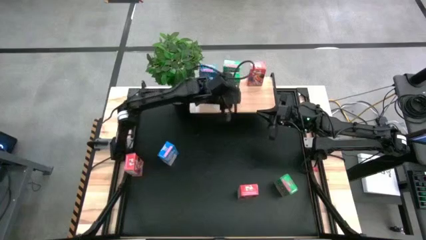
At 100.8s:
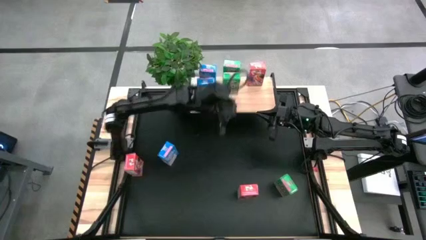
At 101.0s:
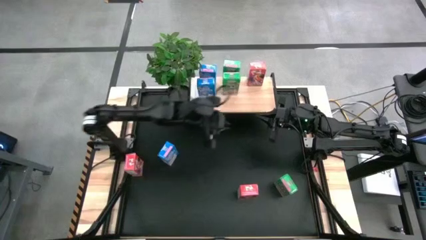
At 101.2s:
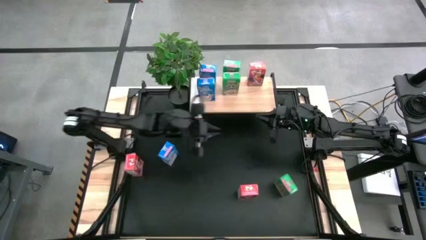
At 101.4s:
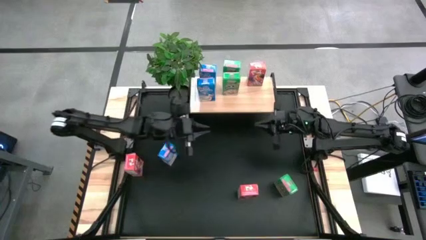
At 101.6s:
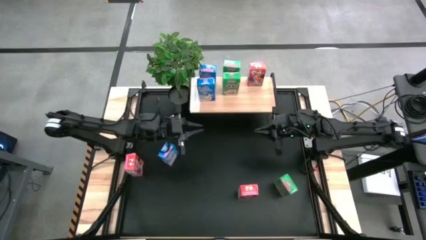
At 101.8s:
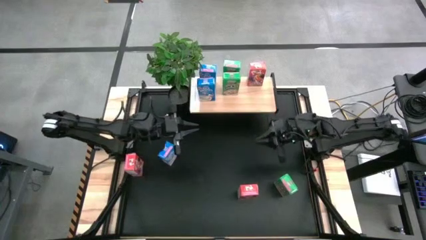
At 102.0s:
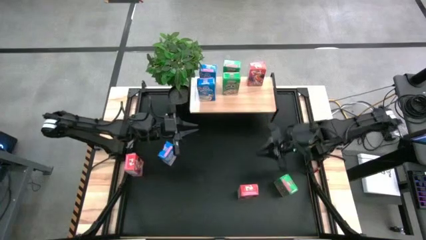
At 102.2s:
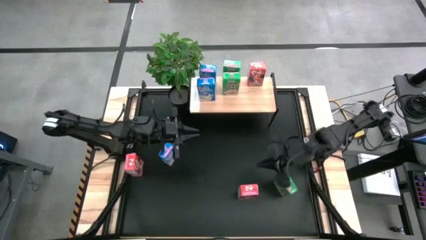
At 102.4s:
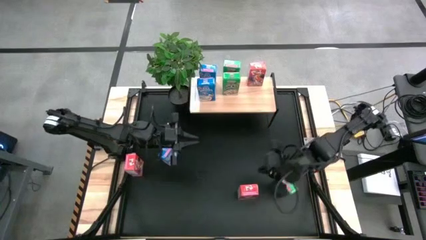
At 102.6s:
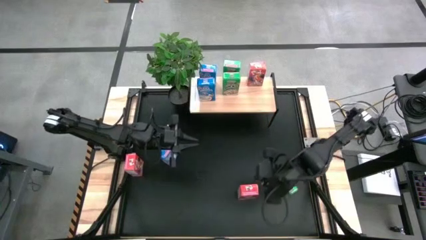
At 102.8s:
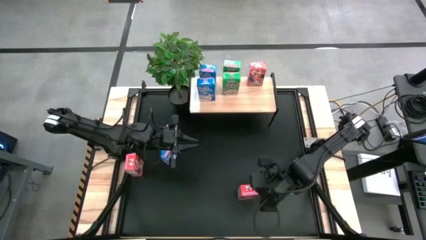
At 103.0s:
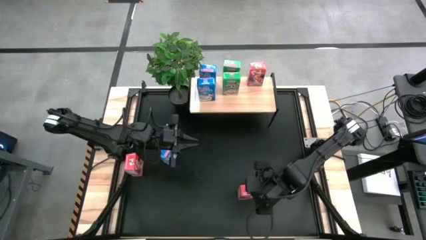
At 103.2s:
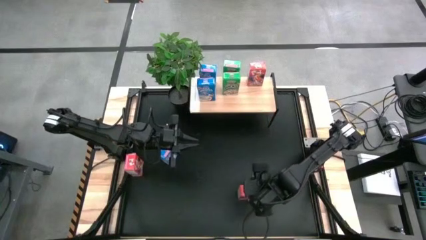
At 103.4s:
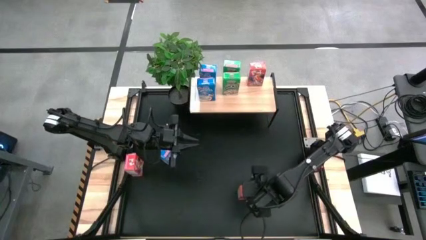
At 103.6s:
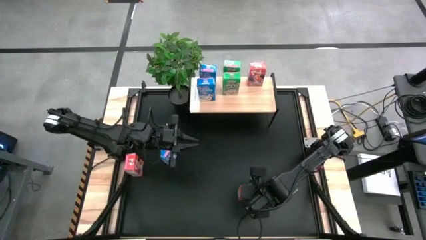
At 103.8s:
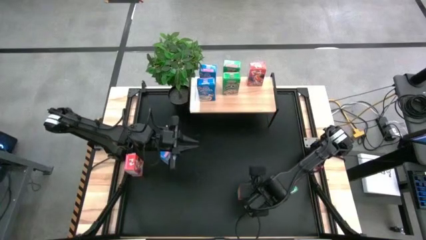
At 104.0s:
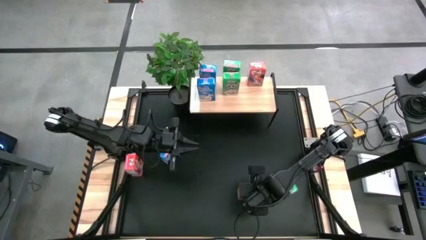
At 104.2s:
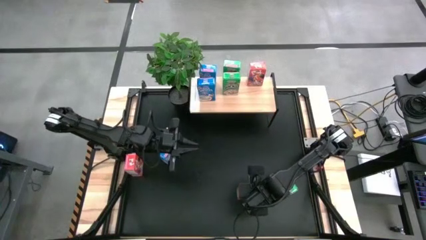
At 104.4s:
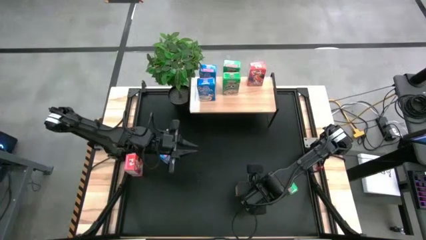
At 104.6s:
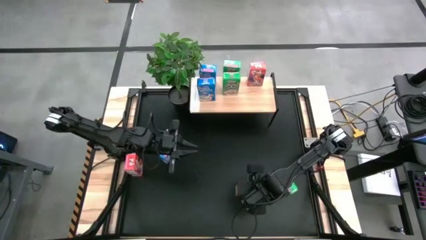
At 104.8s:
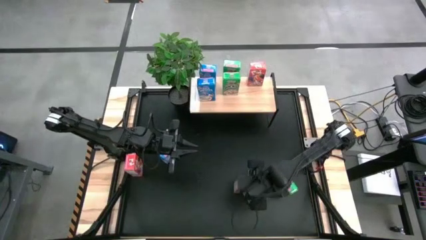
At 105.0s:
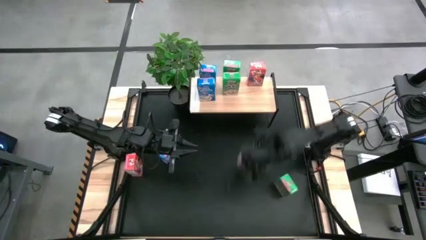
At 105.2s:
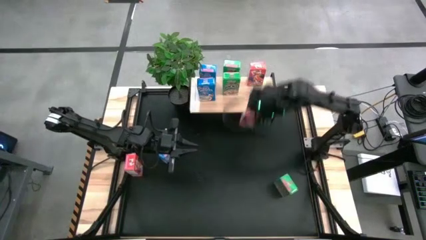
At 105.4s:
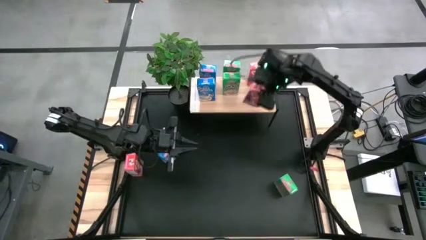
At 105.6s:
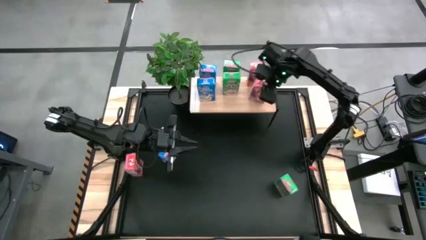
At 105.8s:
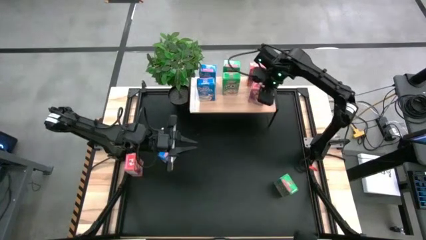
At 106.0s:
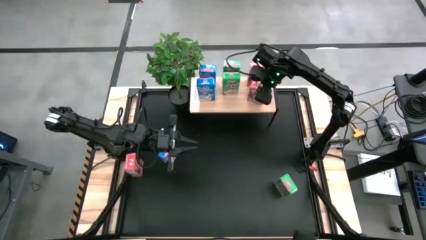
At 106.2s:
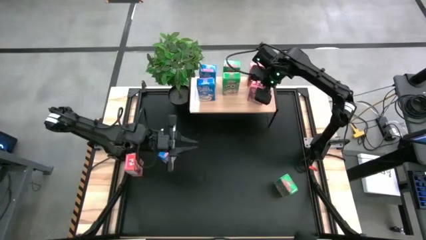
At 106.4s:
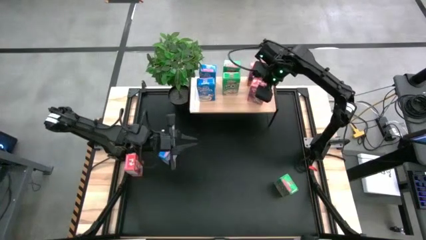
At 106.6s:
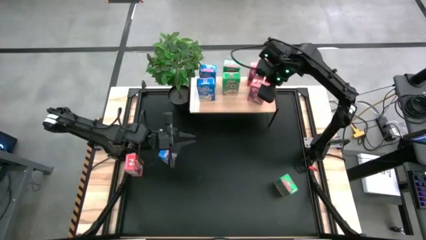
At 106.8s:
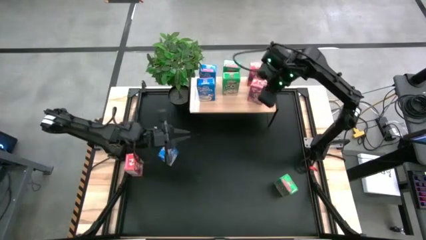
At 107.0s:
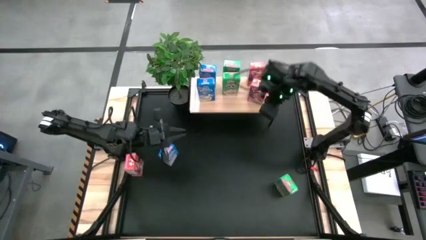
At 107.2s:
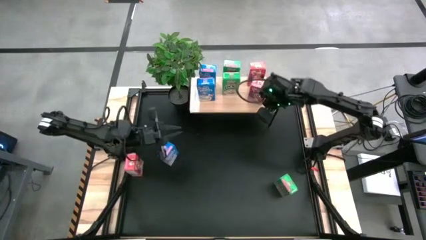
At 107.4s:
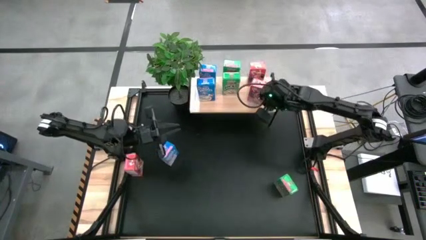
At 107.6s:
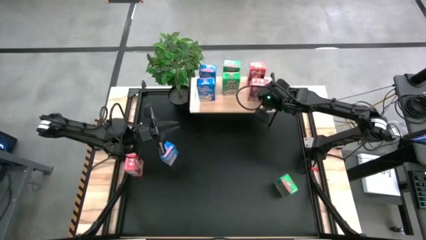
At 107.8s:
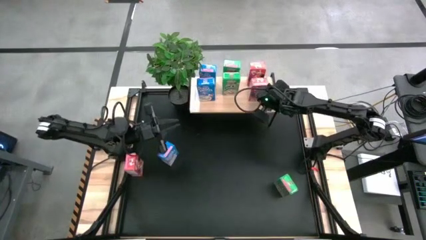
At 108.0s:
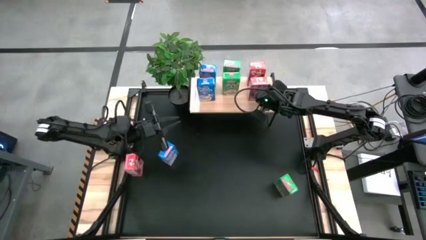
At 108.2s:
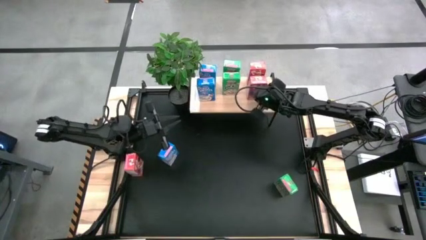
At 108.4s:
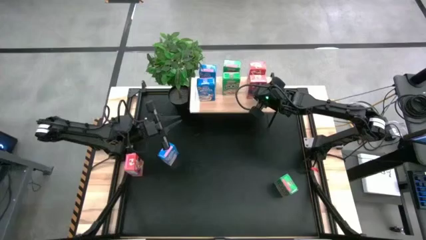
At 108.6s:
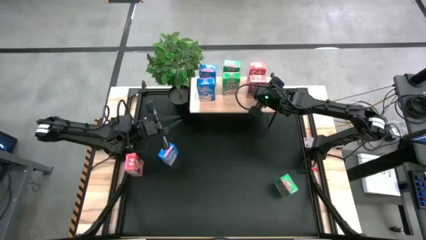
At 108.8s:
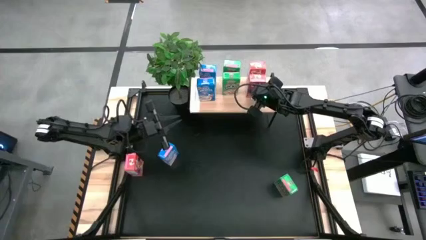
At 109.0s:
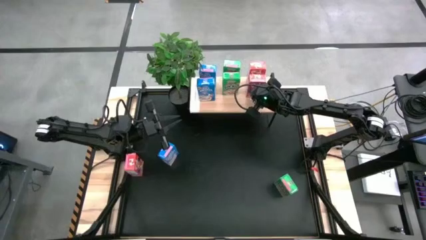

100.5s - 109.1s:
Task: Stack cereal on shelf
Put the right red cereal box on the shelf, aligned with the other red cereal box

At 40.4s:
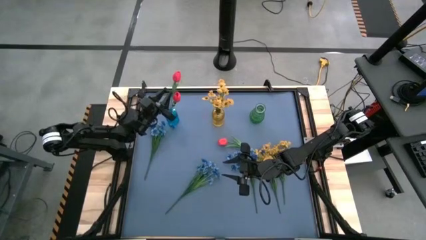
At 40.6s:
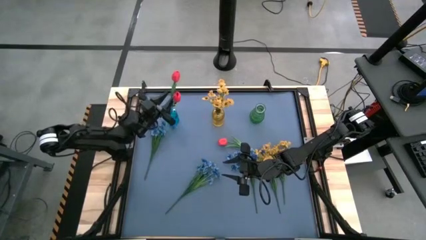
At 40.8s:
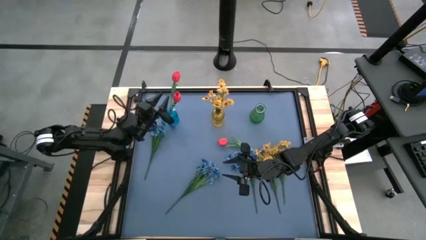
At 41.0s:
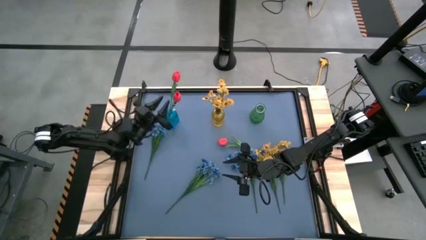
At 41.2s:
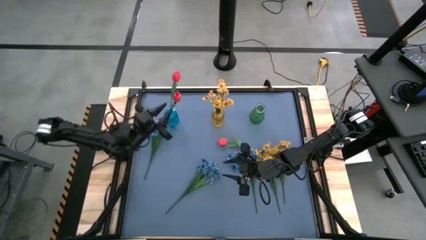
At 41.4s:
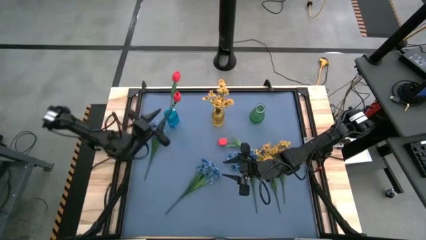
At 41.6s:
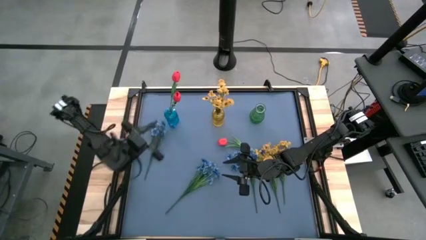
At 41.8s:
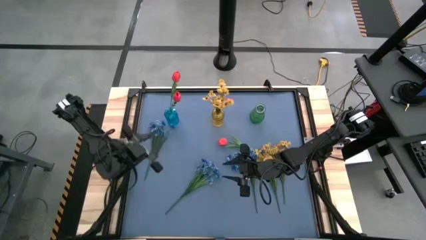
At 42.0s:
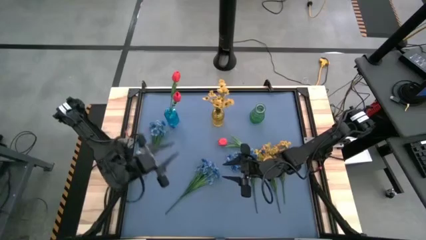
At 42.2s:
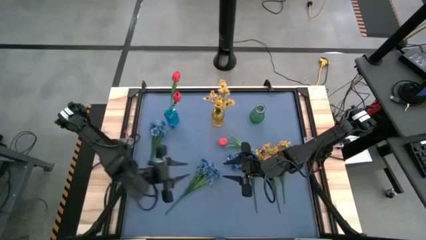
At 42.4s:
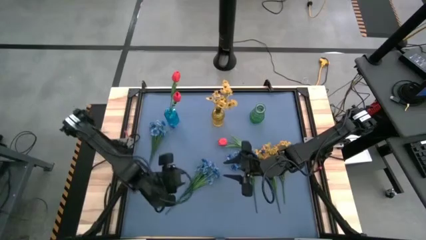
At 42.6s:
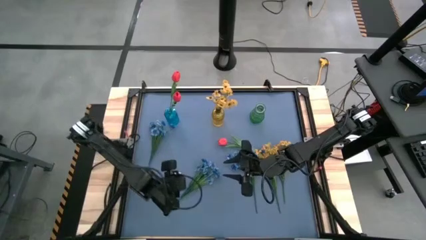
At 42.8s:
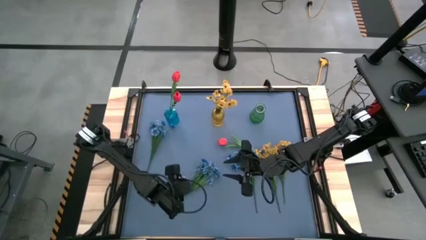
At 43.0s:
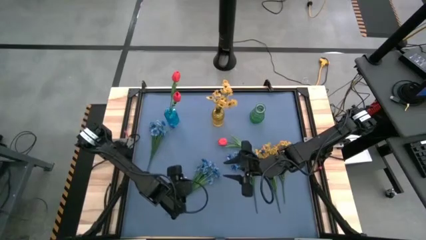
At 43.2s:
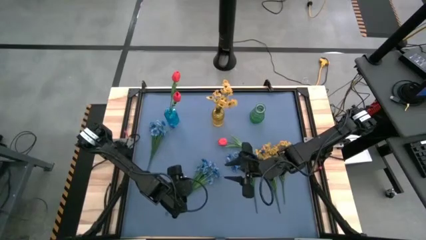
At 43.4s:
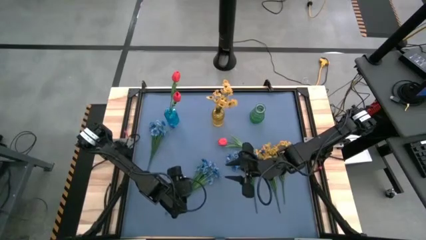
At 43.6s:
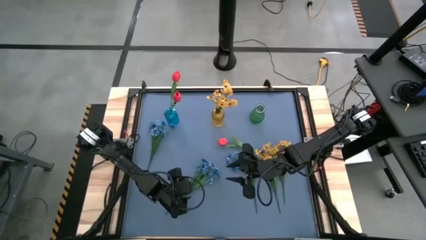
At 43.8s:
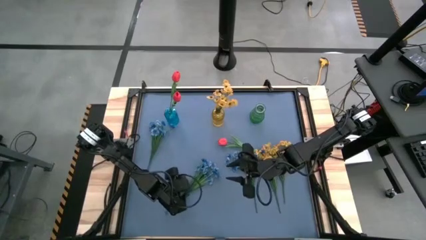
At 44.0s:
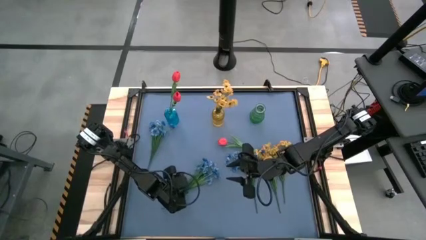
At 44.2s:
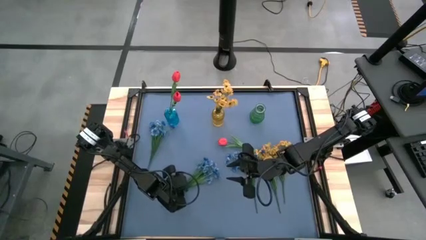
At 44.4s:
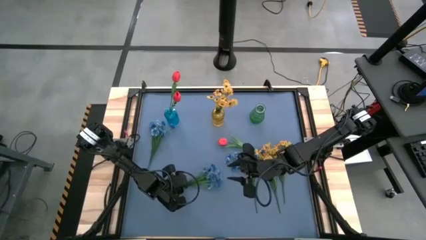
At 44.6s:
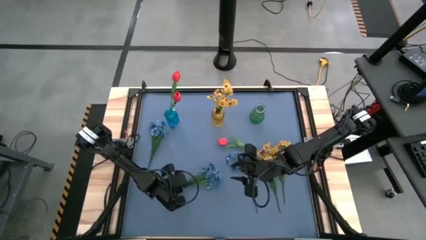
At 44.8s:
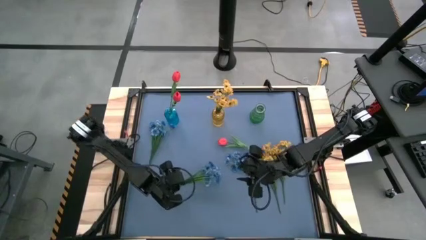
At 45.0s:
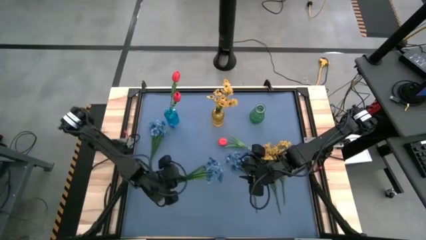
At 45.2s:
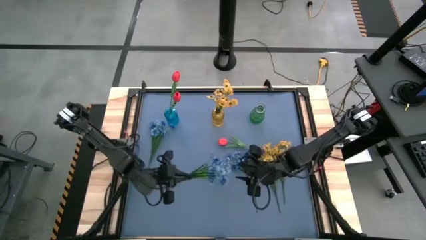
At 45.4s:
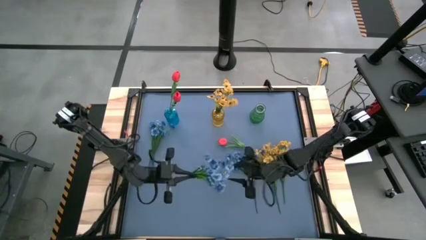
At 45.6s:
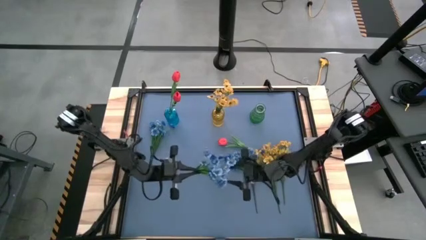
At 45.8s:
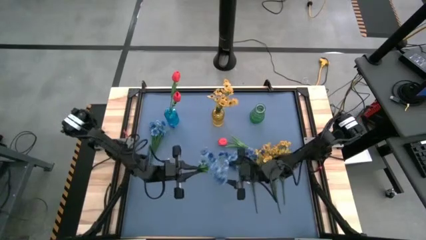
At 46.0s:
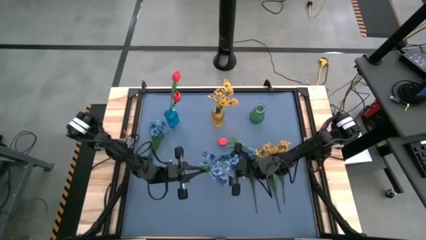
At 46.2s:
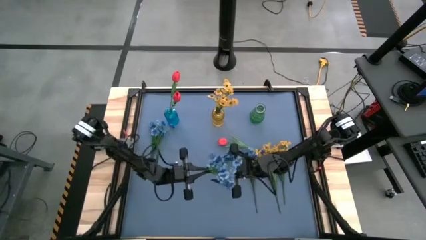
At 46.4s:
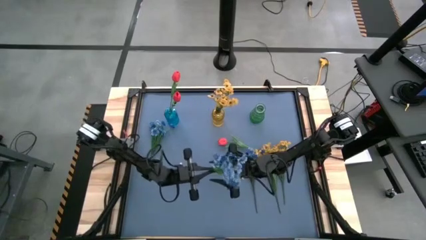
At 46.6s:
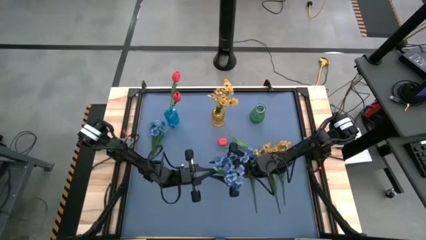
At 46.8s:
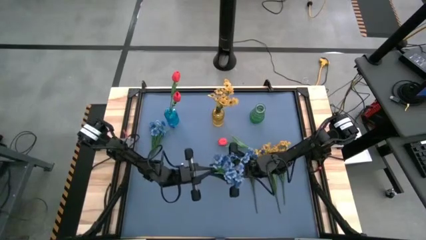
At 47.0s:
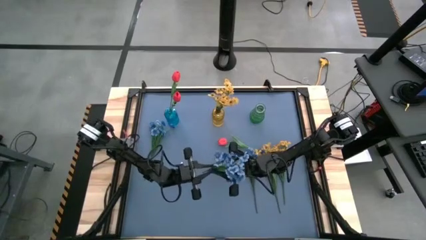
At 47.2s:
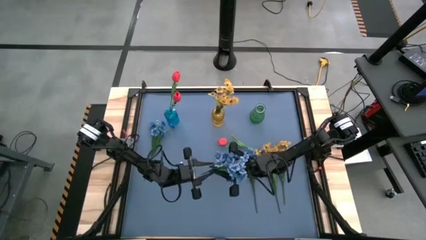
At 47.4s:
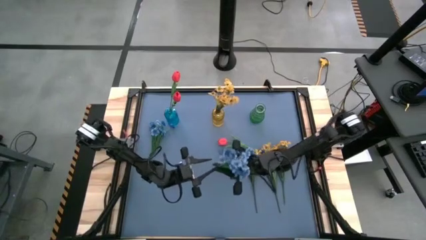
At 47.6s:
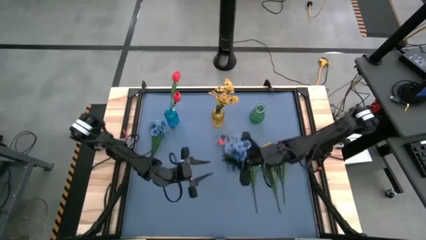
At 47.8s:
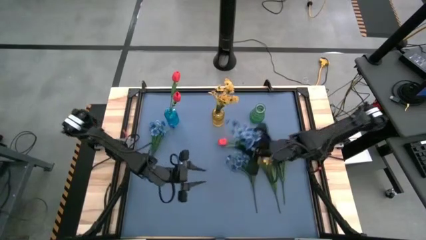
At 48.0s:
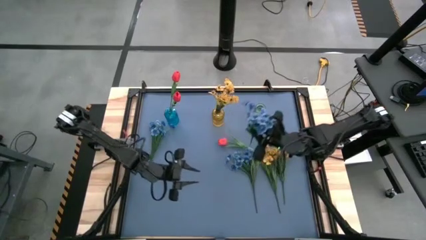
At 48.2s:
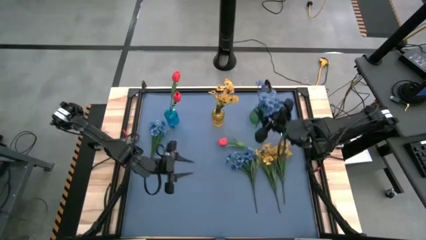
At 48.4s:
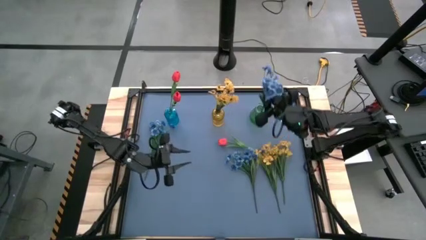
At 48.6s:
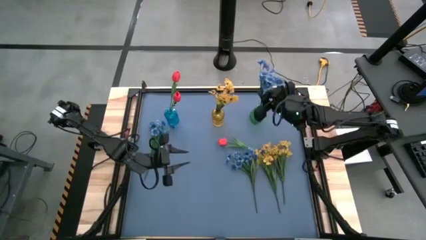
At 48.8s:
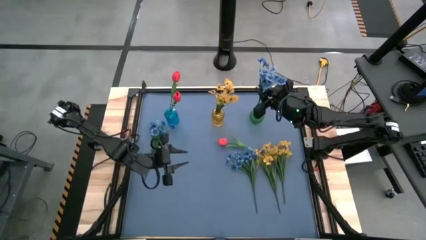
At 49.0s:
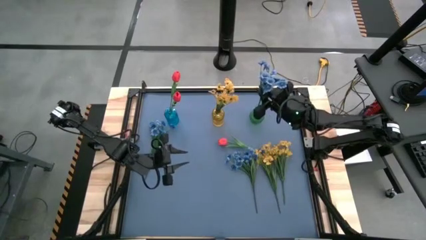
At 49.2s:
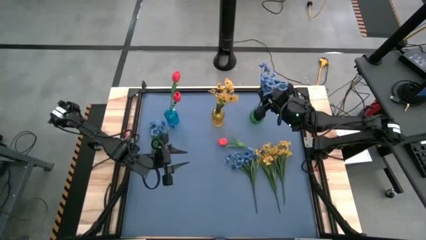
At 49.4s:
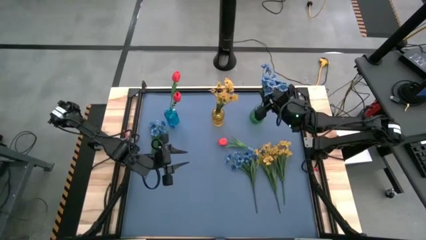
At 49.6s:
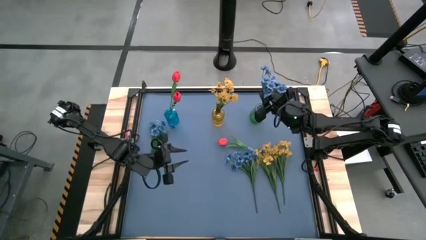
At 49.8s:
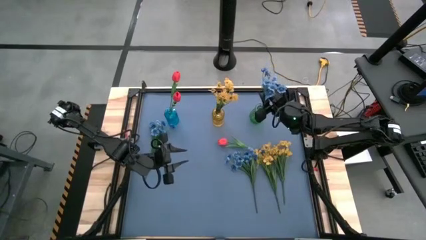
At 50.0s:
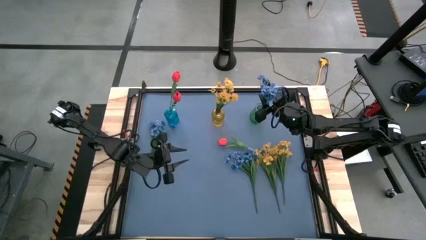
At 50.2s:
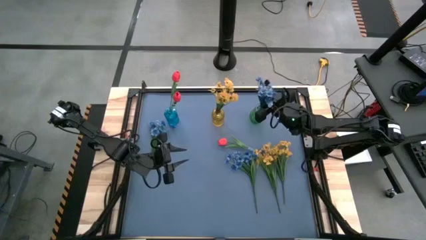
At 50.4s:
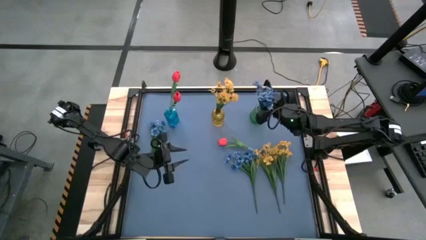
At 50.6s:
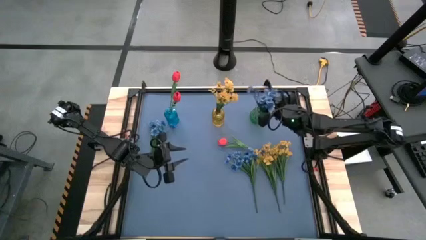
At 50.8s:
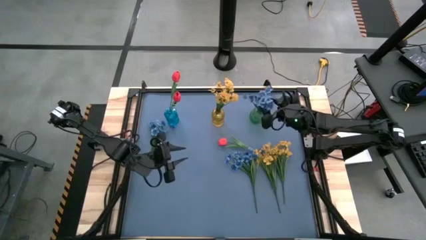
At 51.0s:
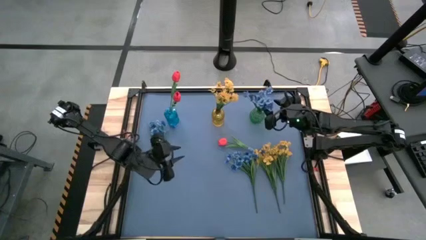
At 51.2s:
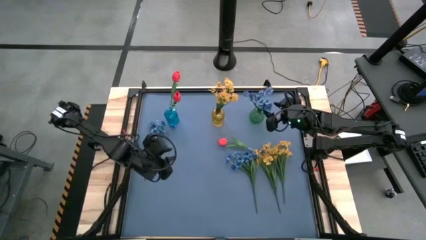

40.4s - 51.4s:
Task: Sort flowers into vase by color
Put the bottom left blue flowers into the green vase
